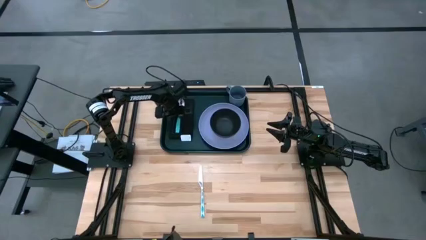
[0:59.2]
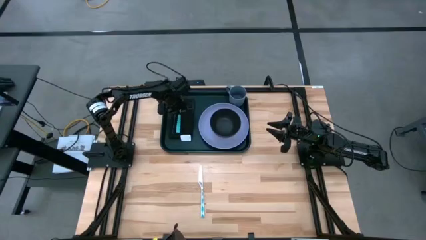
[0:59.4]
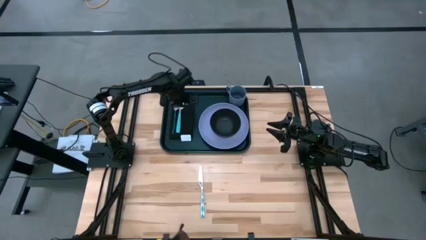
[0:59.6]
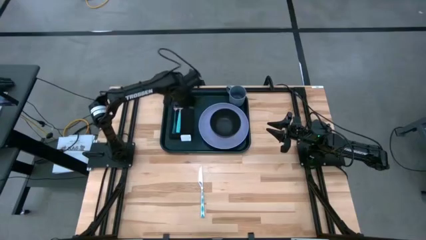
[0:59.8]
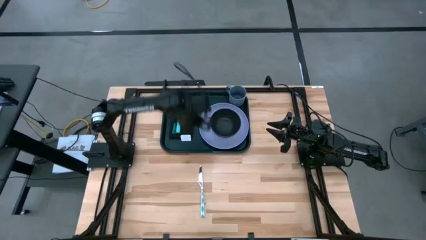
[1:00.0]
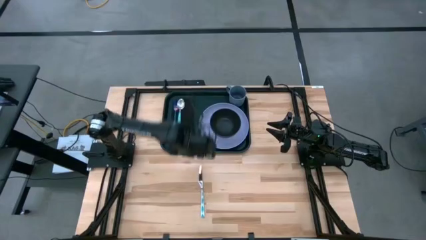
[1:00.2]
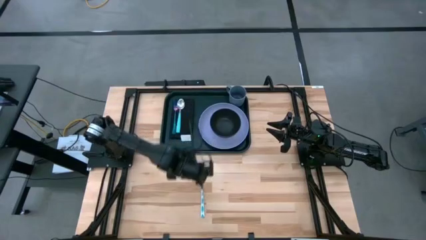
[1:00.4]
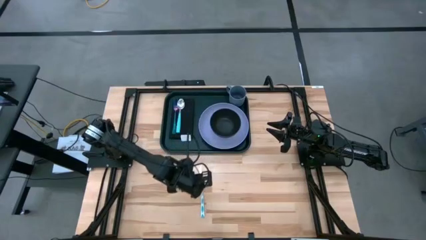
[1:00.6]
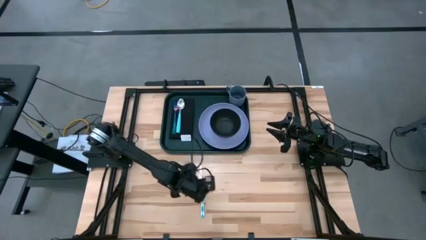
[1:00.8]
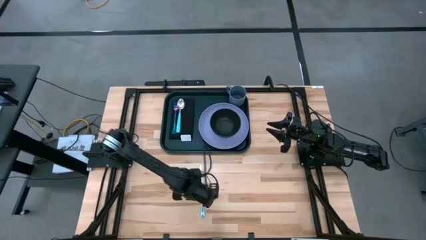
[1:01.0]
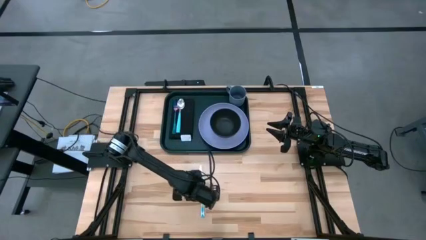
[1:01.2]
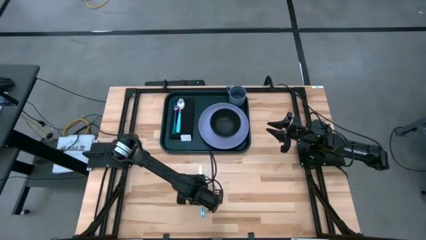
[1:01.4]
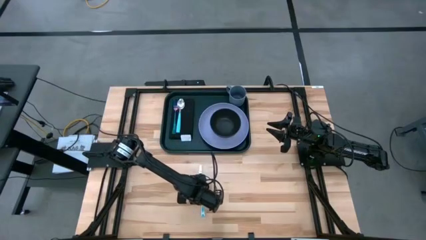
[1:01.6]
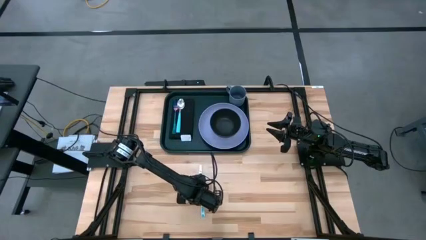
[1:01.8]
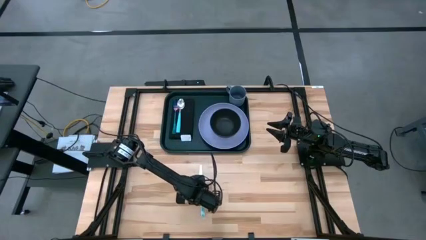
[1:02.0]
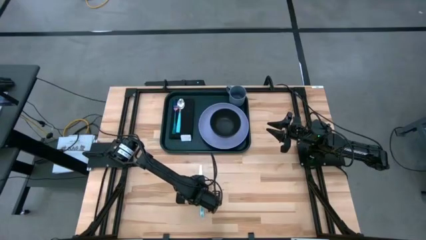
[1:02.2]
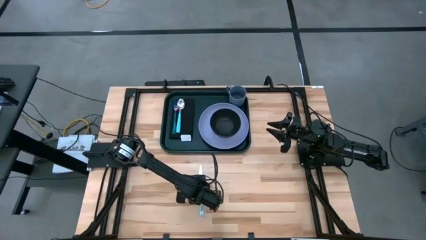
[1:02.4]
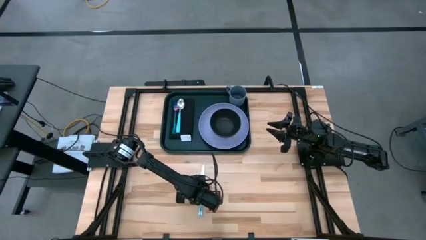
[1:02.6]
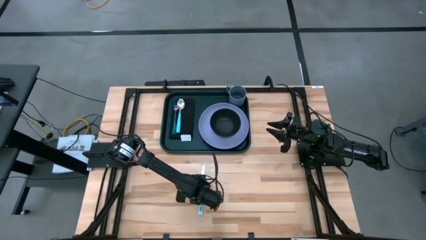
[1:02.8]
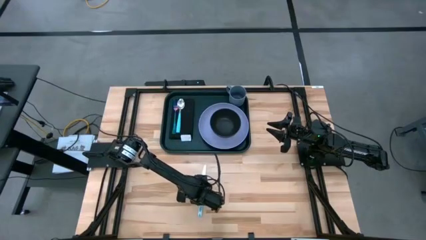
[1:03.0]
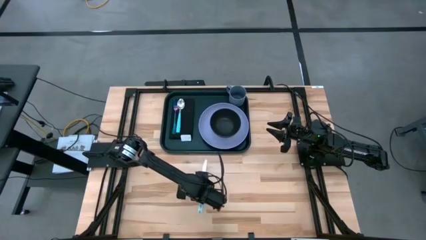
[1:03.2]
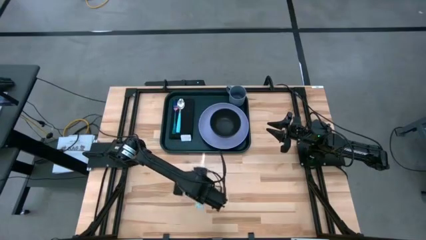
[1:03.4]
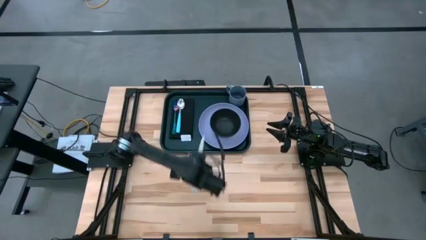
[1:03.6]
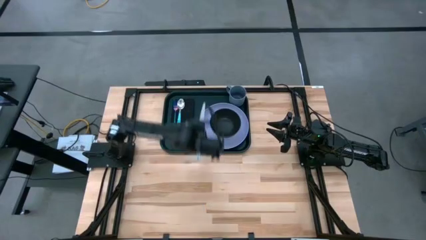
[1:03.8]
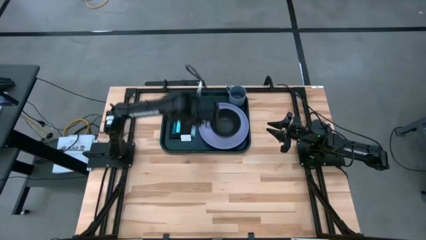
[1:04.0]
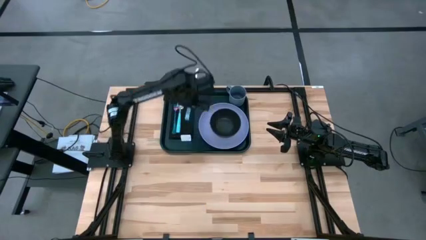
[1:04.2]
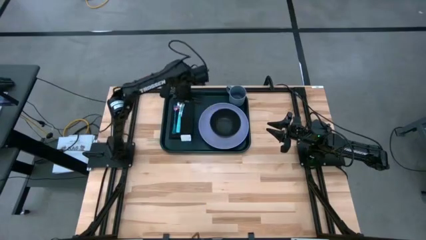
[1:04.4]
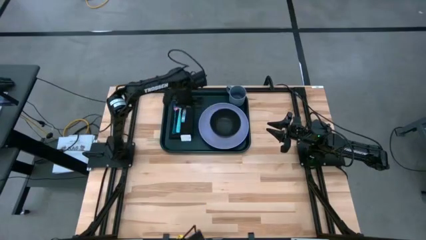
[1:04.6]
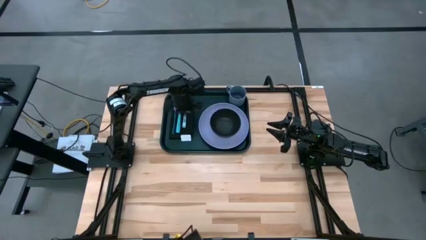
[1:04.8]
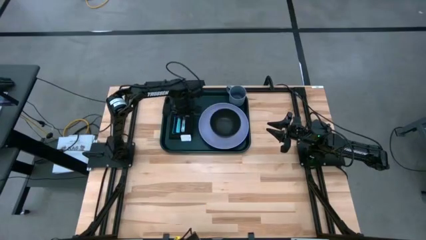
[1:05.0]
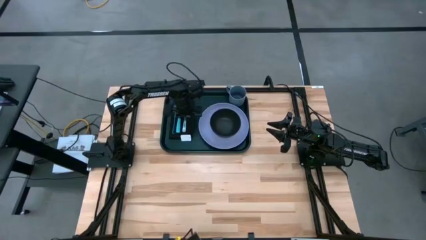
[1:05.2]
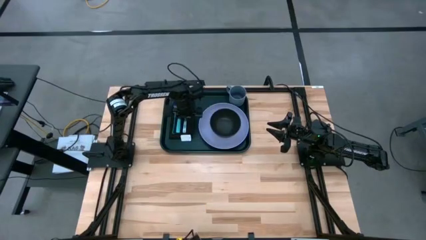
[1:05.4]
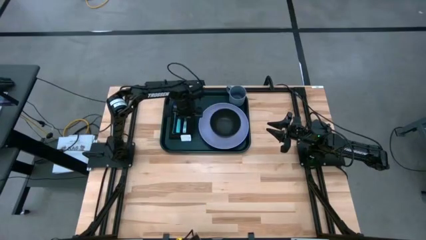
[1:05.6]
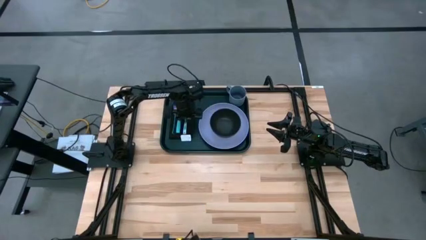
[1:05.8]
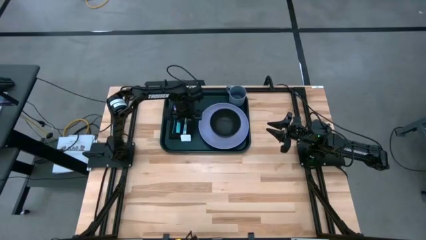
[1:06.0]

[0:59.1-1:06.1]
Task: Set up tray
Put the blue knife to the right of the green spoon on the black napkin

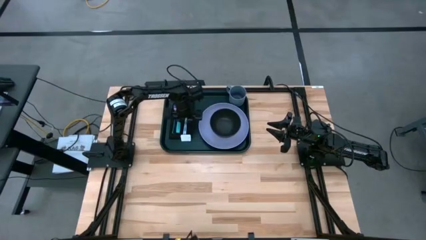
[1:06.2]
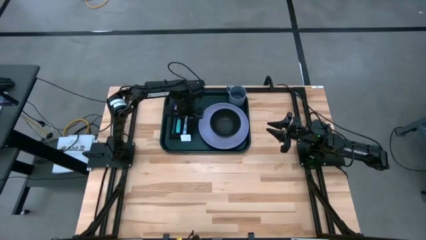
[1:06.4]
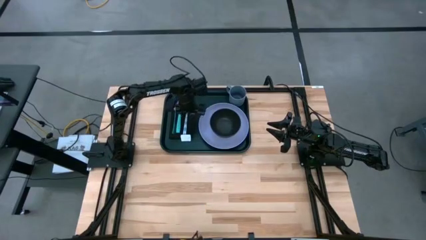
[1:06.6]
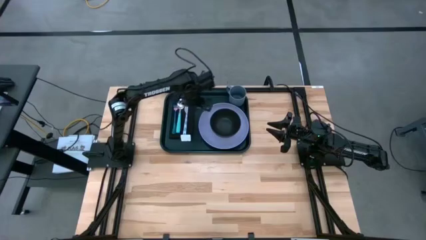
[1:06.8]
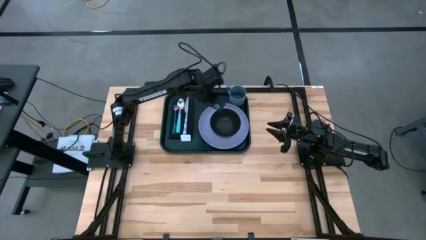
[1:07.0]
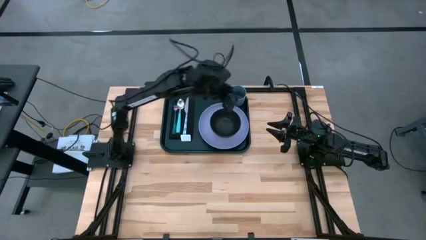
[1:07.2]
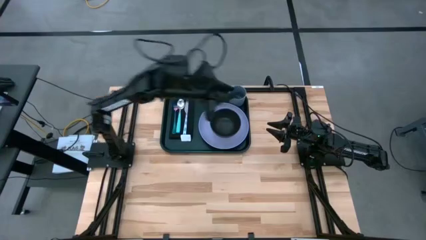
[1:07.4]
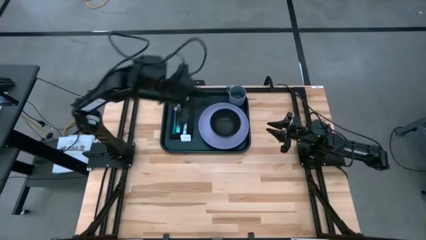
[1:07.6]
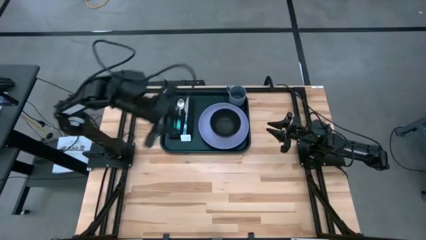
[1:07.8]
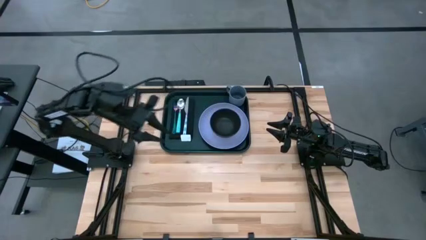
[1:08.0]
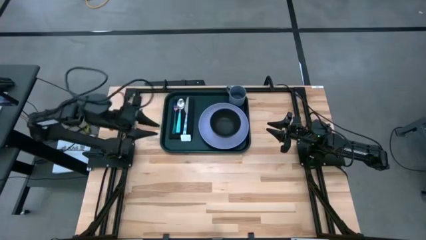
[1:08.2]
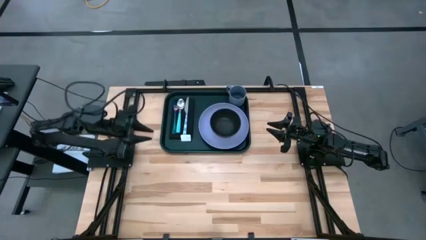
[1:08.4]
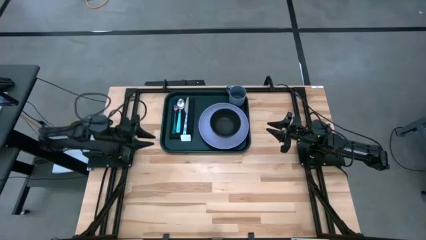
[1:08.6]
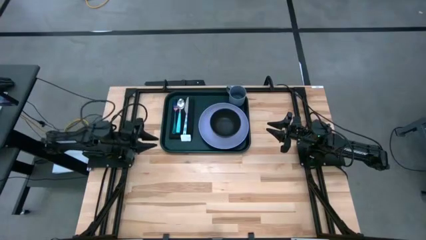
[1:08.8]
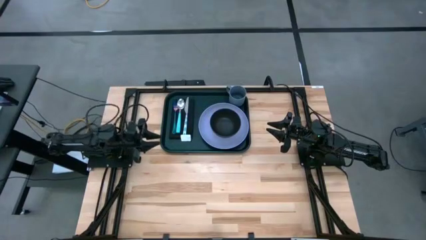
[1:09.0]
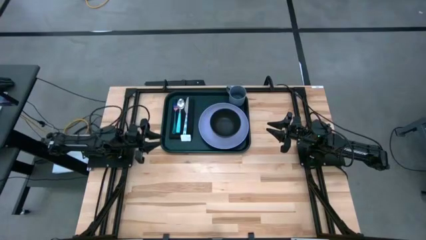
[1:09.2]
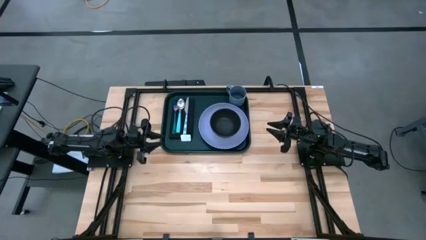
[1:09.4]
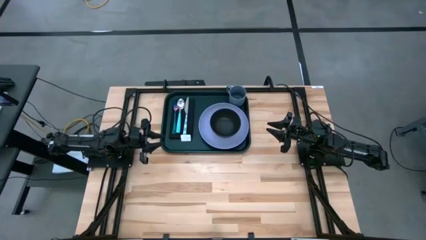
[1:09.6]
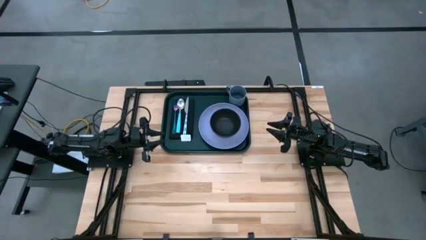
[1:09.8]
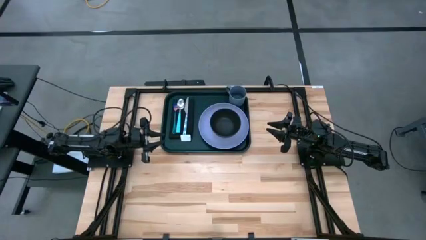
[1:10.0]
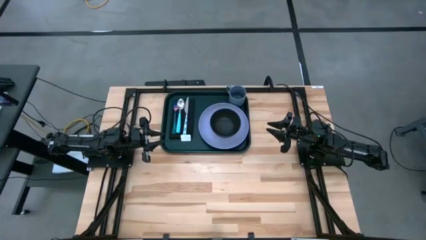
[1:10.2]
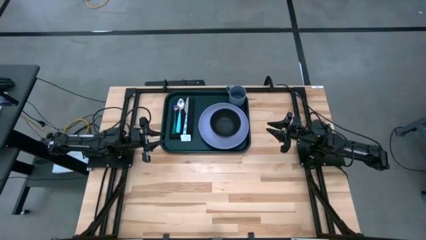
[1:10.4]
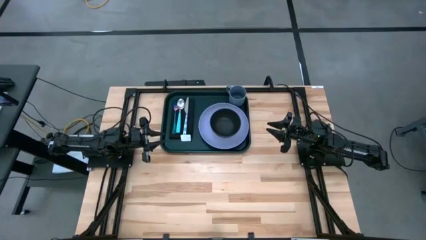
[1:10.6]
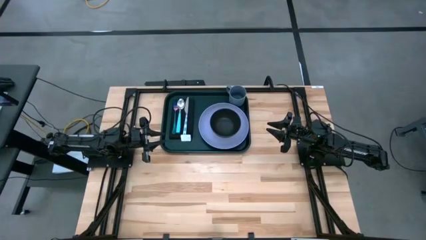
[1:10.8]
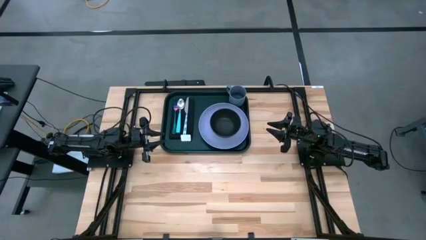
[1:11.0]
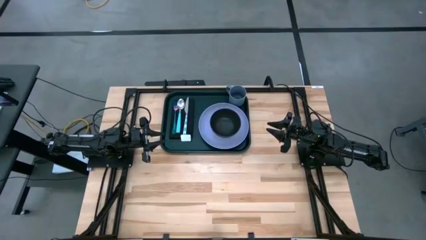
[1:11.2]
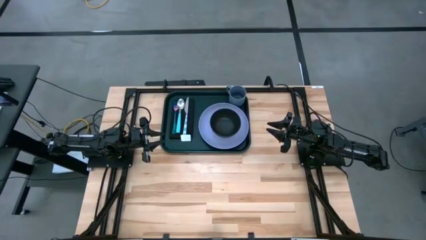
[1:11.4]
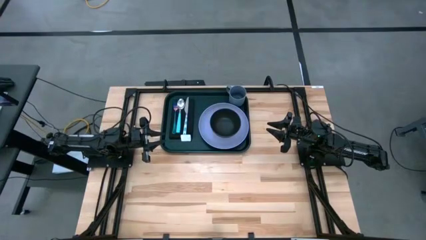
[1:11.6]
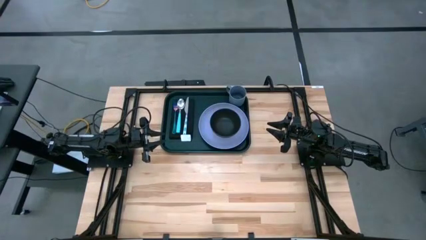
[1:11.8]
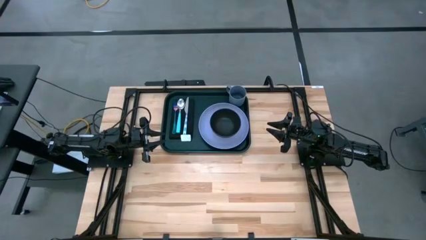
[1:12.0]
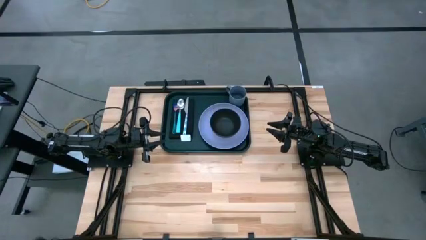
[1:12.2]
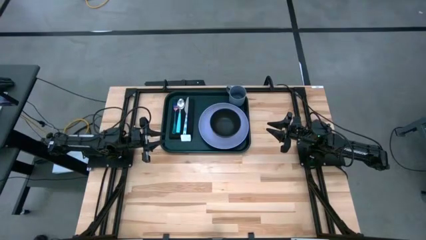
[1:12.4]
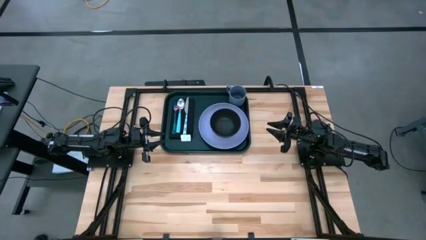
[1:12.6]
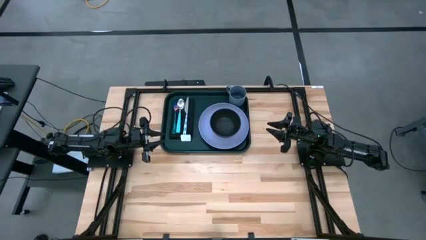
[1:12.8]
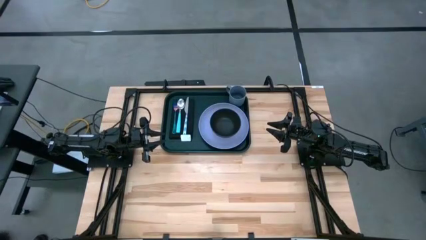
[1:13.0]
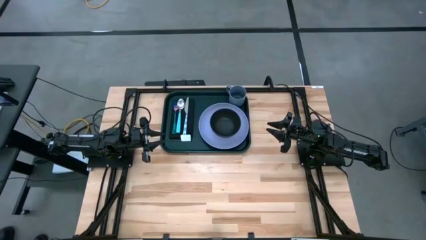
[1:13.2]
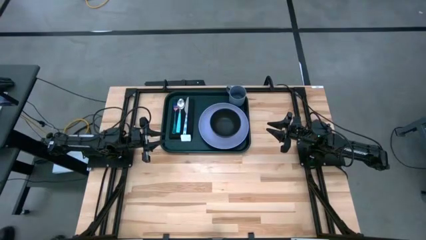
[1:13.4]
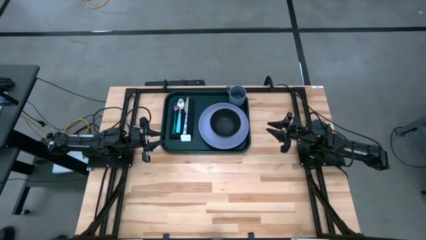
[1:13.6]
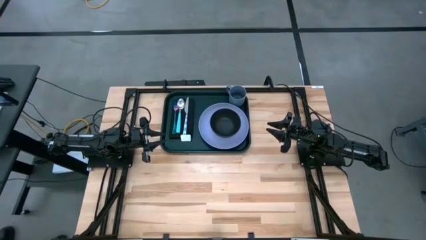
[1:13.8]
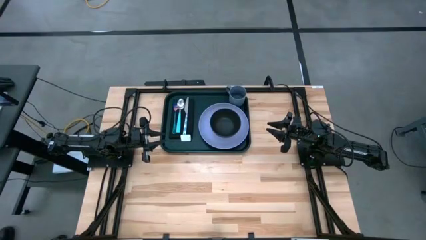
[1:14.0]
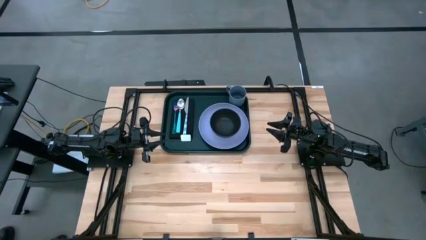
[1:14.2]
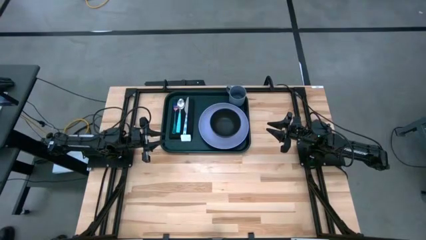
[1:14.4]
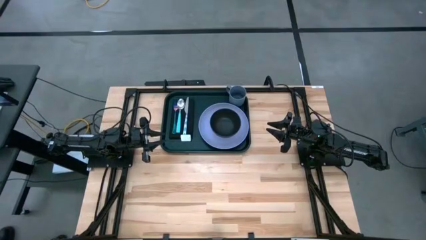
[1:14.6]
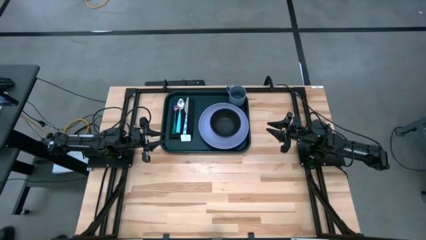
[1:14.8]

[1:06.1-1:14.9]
Return to Home Position

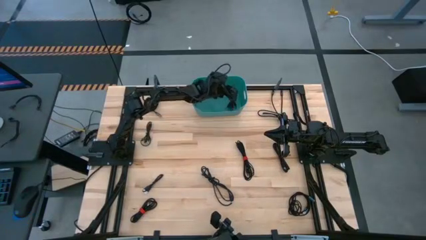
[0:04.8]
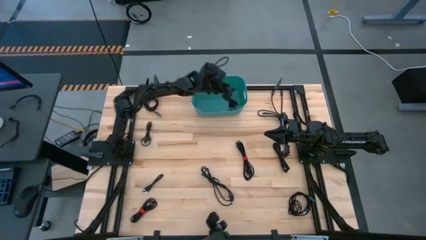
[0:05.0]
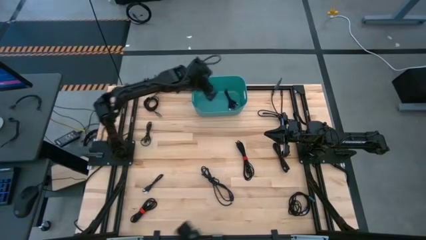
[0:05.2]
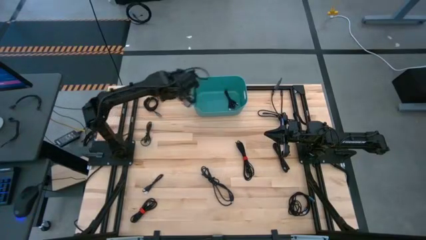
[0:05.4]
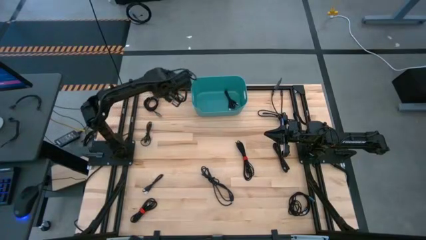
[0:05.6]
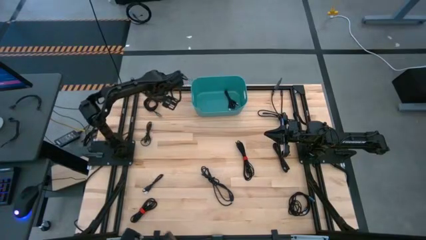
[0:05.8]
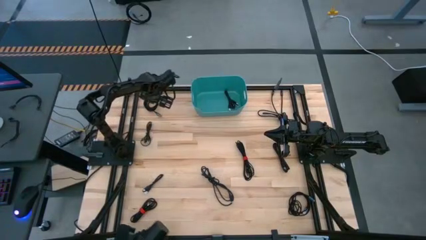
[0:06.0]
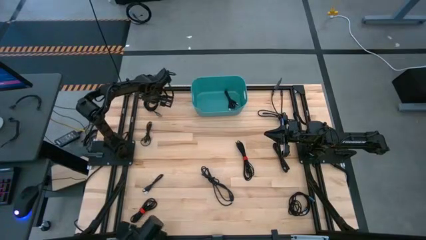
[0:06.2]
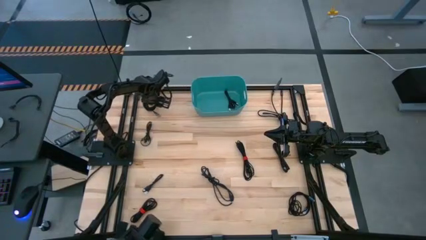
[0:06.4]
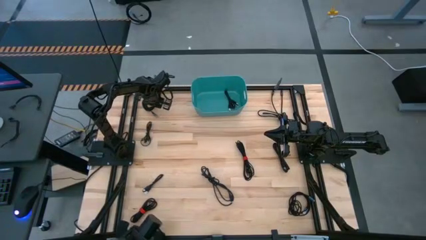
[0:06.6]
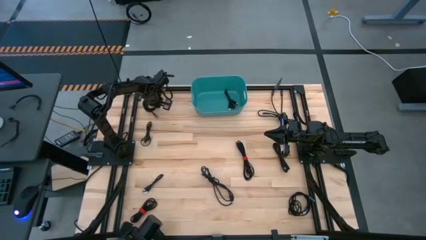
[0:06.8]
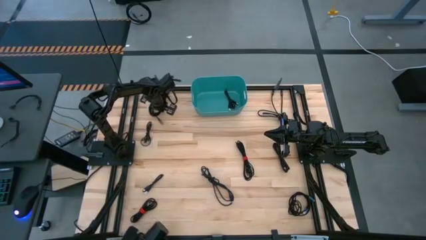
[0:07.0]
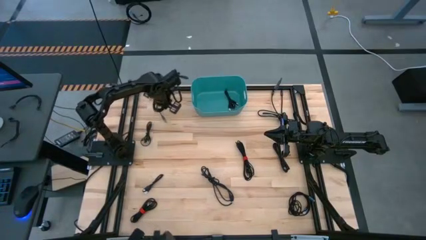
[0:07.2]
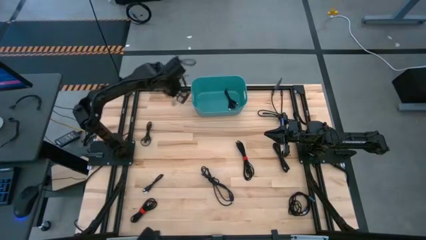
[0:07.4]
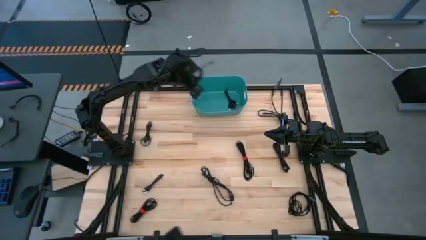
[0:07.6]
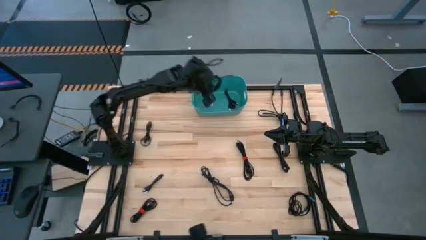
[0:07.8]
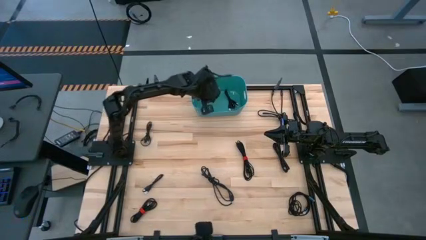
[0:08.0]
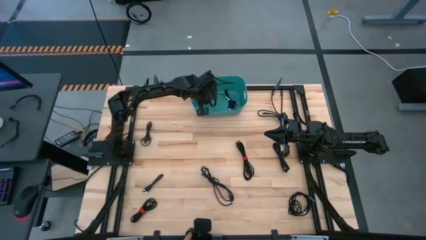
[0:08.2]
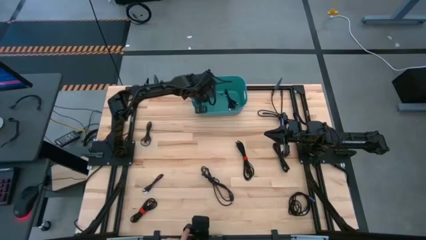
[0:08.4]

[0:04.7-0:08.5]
Task: Pick and place USB-C Cables
Put the black charger cable into the blue bin
